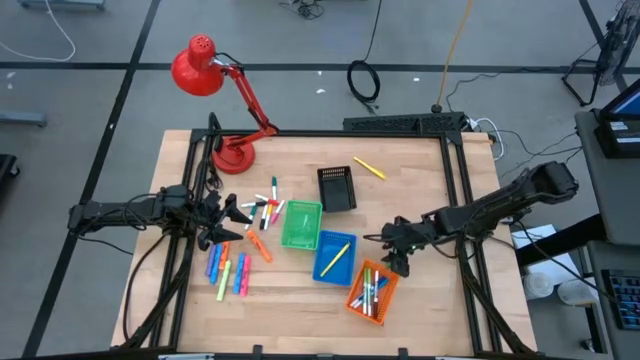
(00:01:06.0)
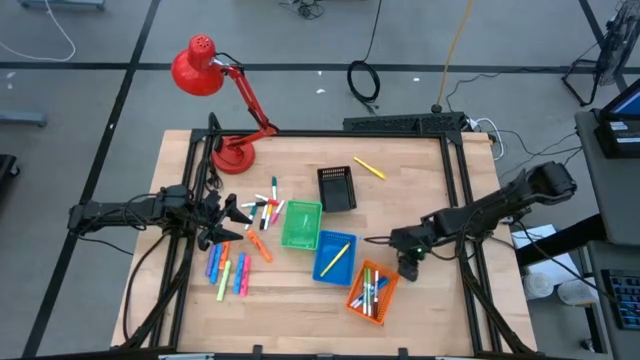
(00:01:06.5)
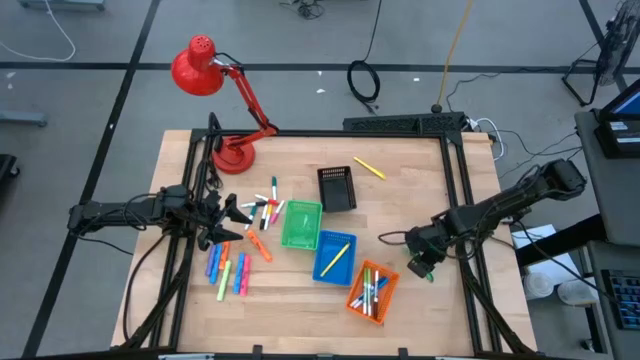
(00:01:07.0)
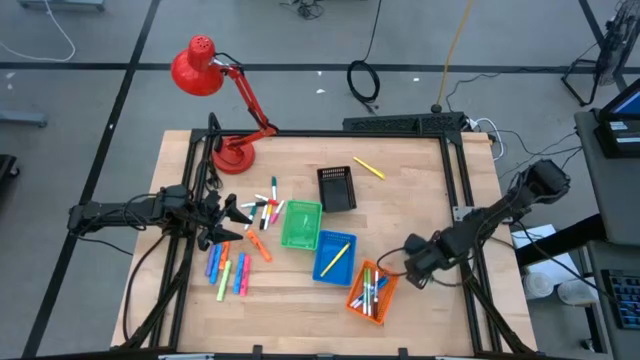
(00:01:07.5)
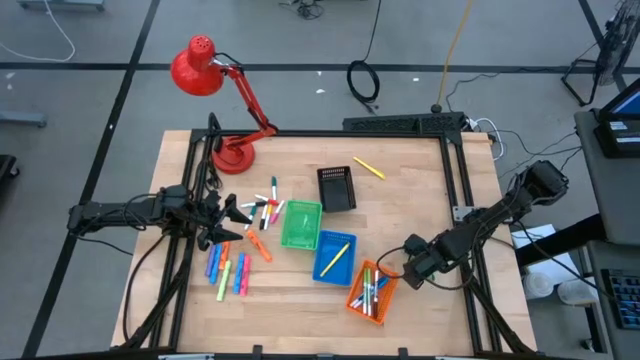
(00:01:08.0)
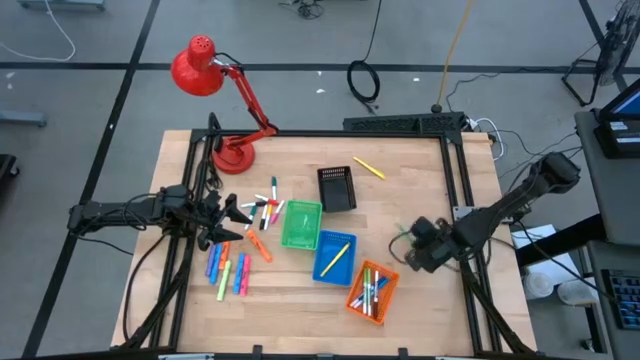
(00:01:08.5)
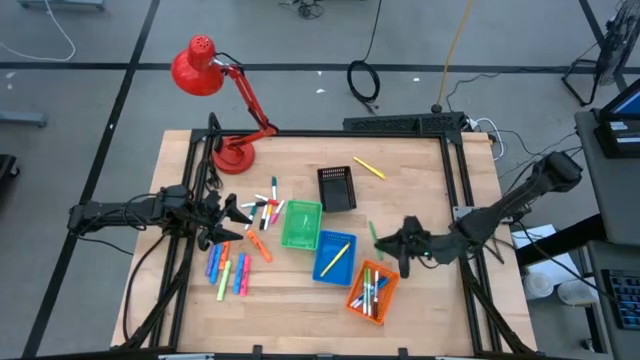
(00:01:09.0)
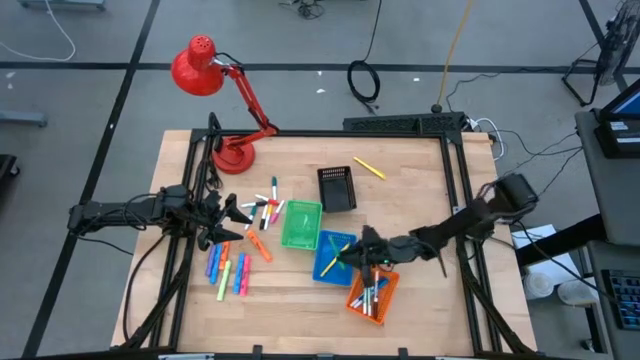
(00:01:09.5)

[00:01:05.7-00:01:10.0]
Task: Pick & Place Markers
Put the green pen into the blue basket

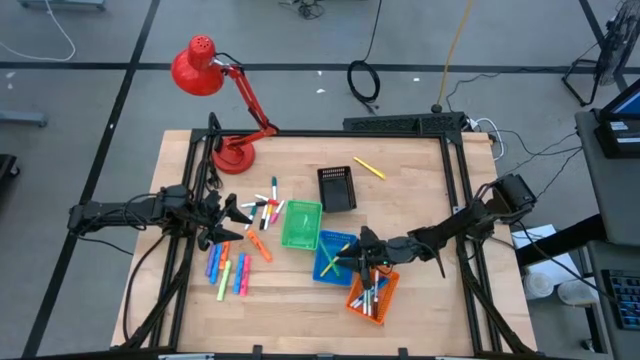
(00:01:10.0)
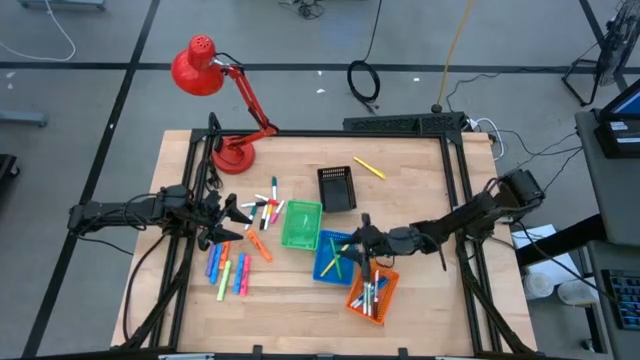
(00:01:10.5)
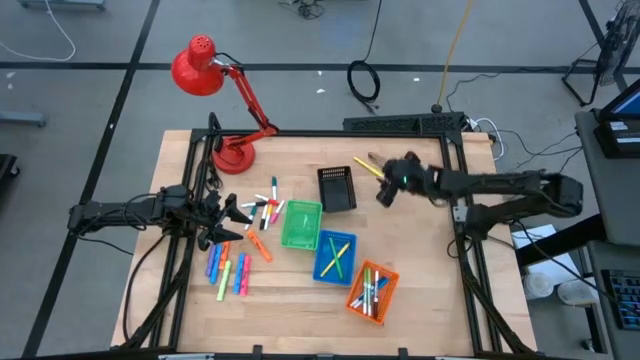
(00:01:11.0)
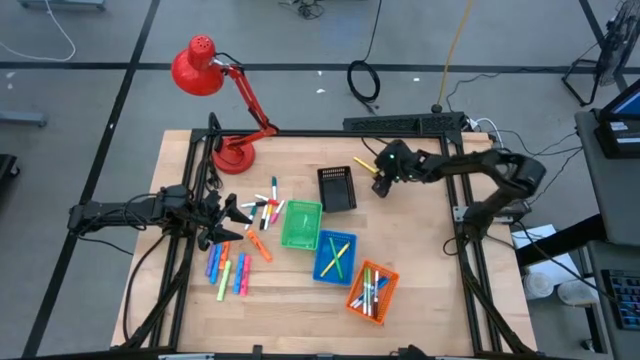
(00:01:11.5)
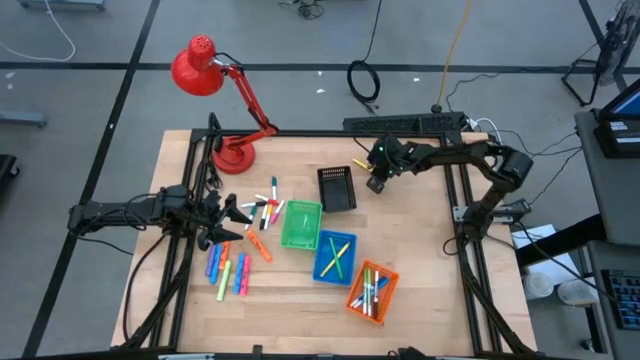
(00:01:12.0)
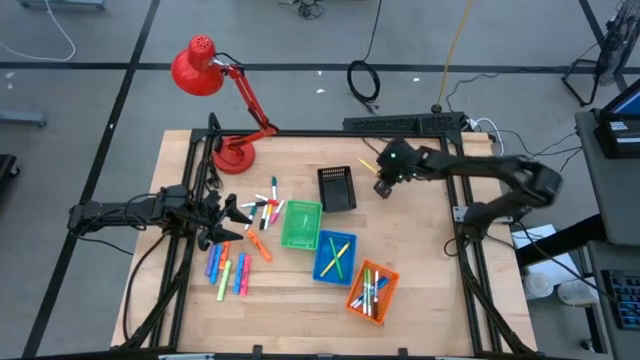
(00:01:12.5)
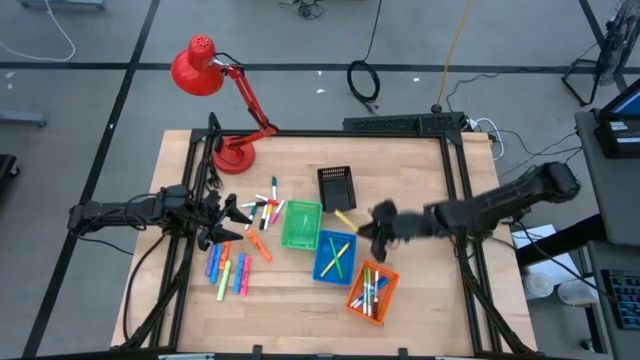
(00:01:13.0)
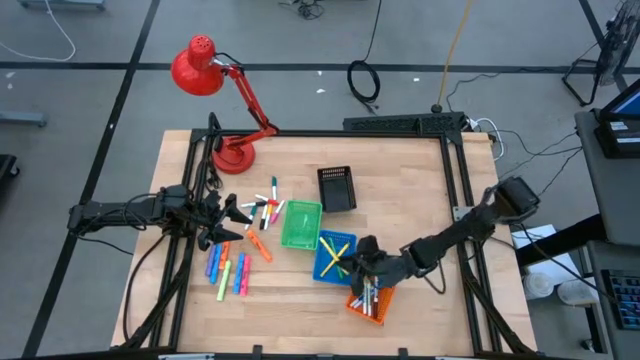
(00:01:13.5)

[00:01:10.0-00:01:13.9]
Put the yellow pen into the blue basket

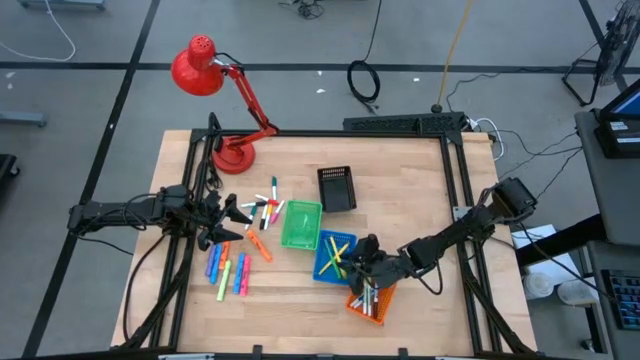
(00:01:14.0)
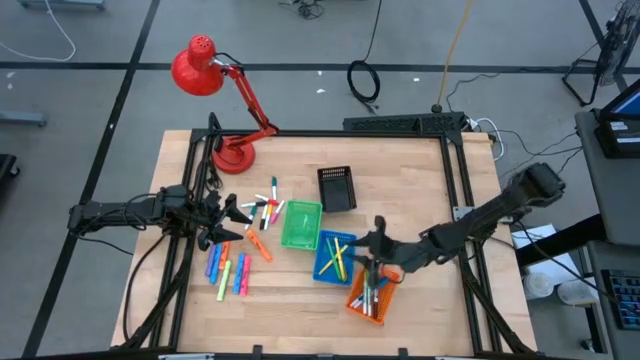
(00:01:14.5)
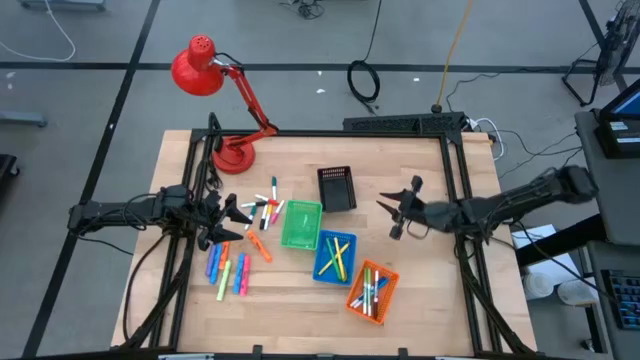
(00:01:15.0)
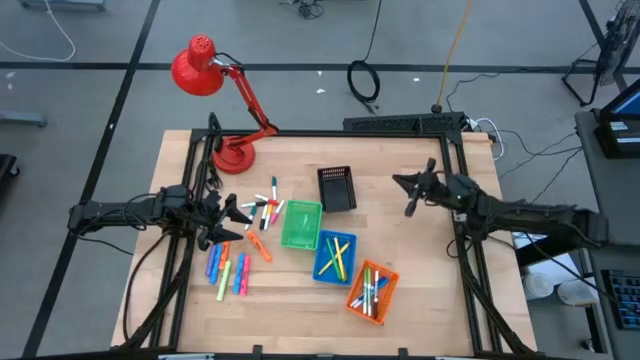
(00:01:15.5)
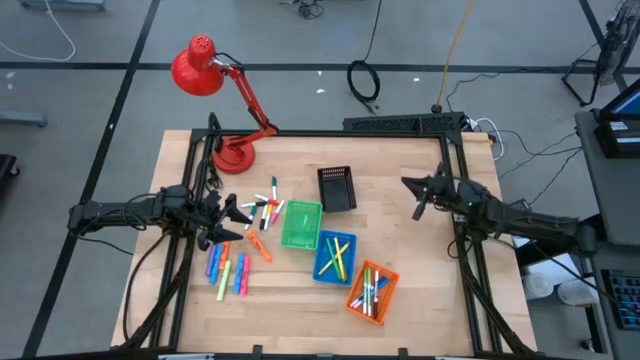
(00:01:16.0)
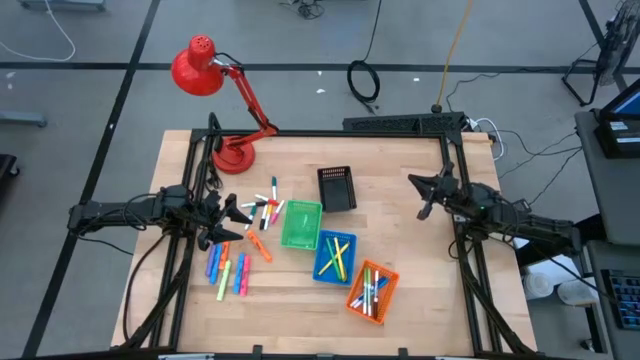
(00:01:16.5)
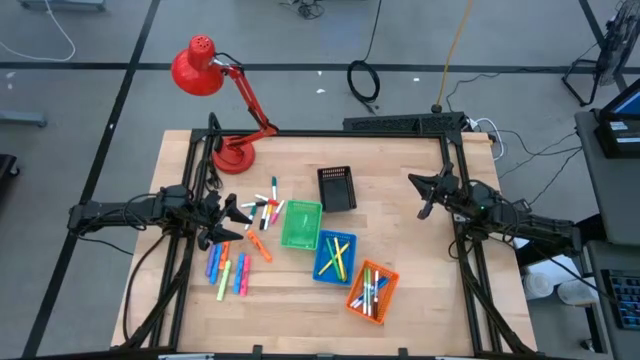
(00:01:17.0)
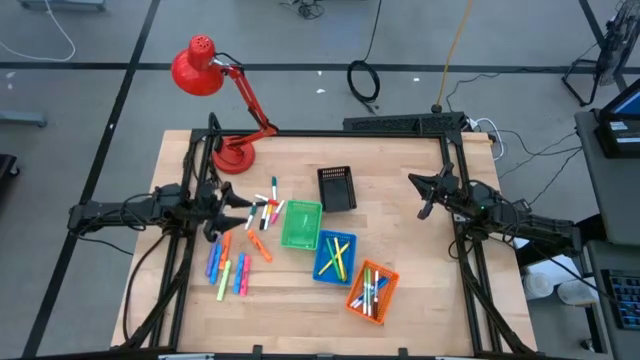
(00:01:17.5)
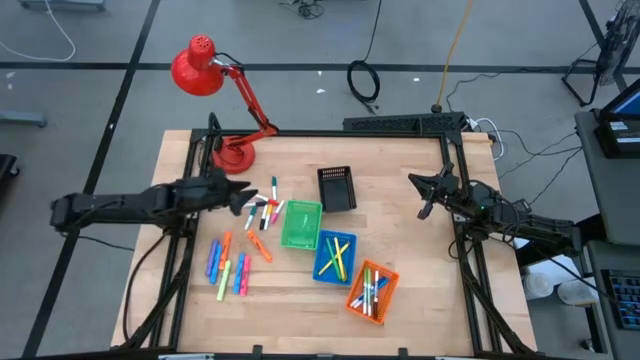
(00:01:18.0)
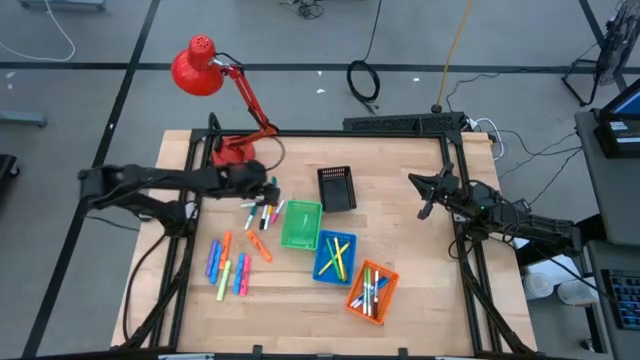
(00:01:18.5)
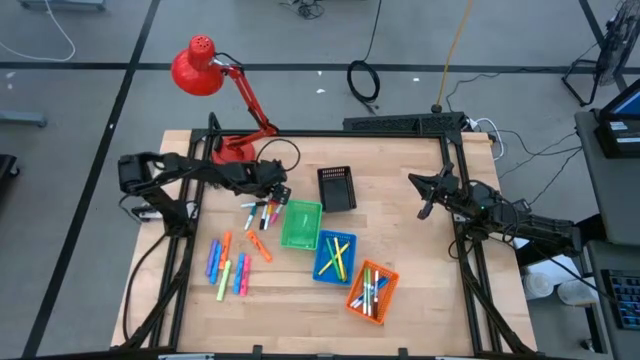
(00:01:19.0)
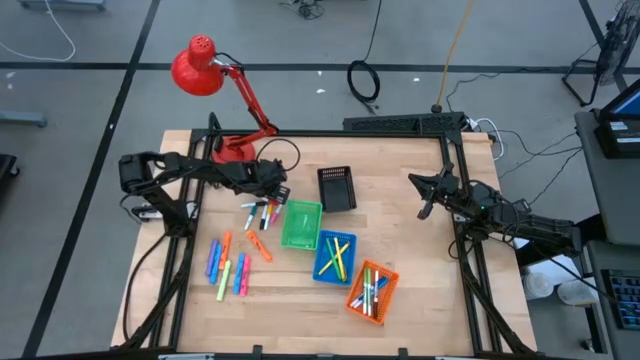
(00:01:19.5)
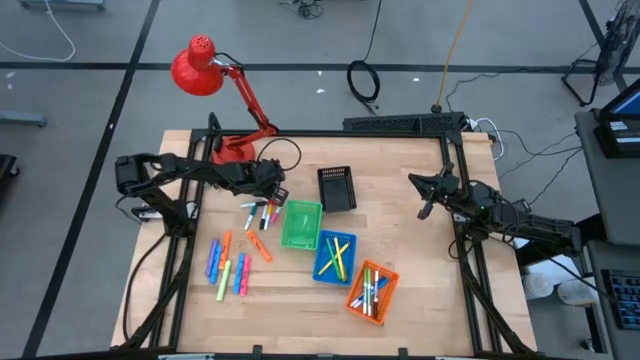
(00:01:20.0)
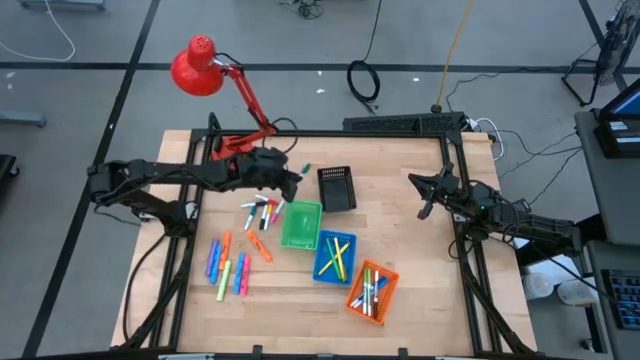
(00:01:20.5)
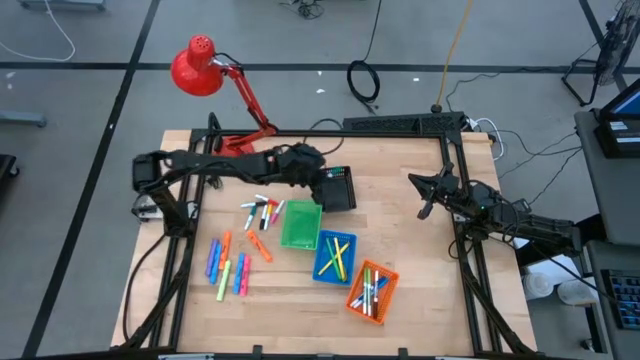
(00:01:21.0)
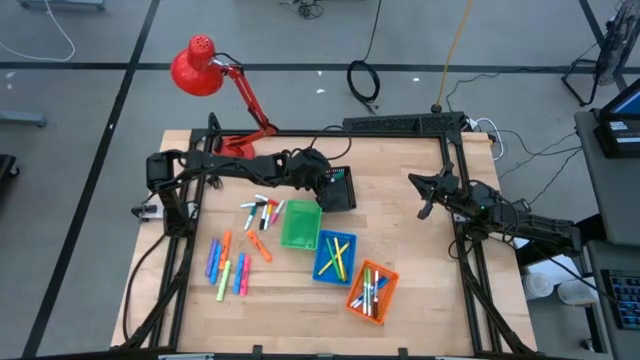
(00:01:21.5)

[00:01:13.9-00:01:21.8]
Put the top green and white highlighter pen into the black basket

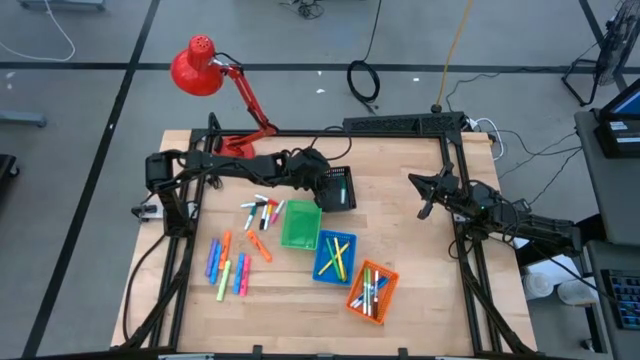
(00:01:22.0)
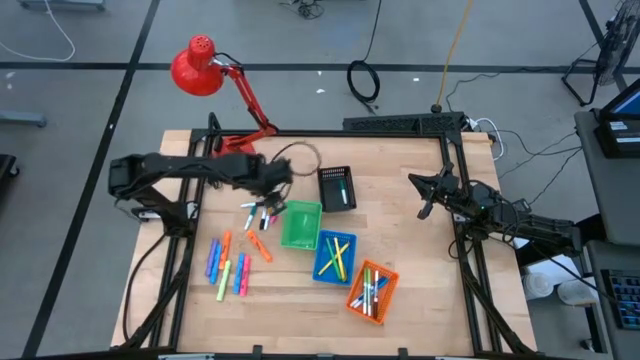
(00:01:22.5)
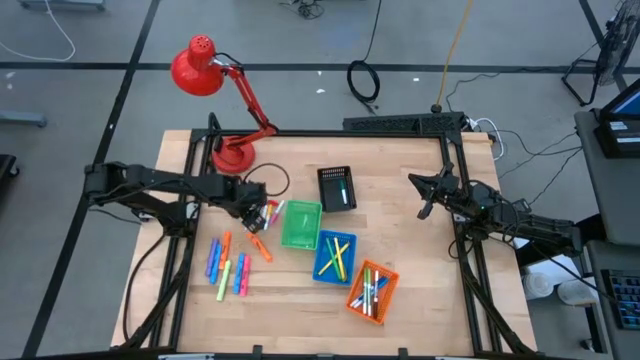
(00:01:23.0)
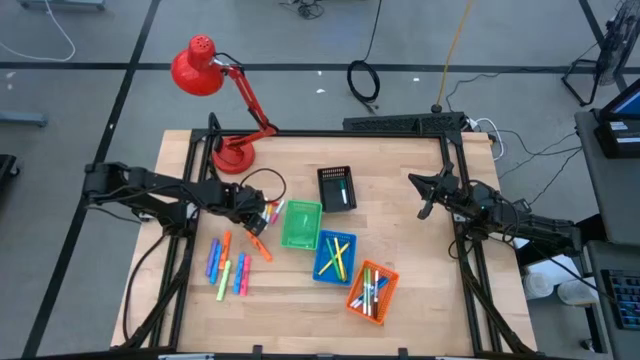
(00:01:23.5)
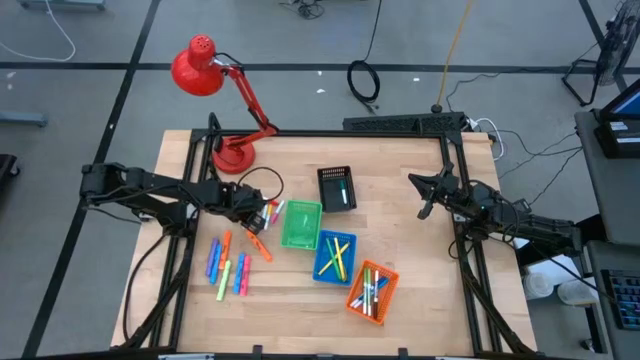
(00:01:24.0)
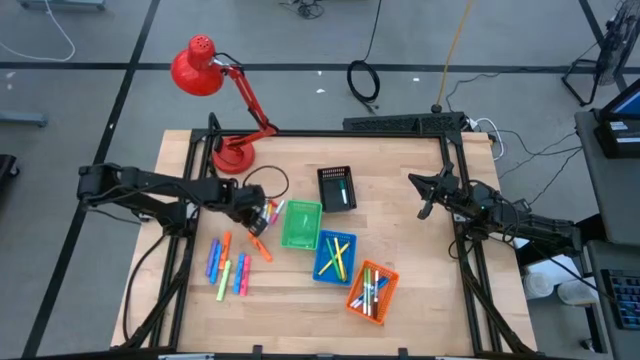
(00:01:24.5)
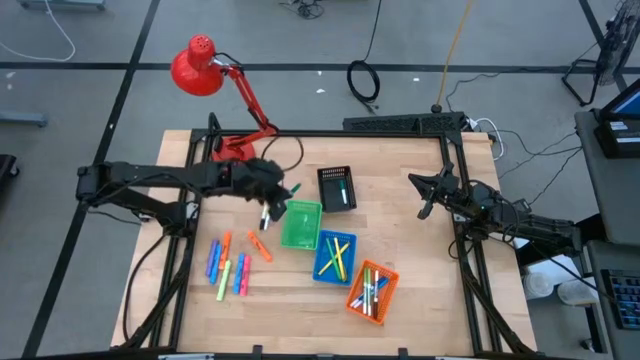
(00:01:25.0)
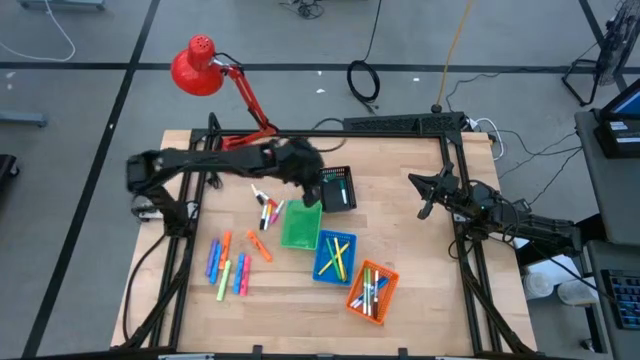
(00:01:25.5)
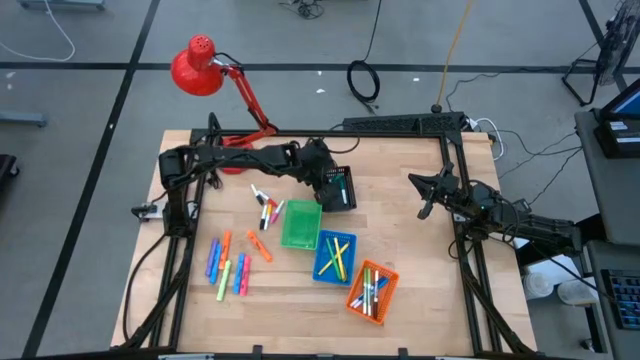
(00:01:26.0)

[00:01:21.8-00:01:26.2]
Put the green and white highlighter pen into the black basket
